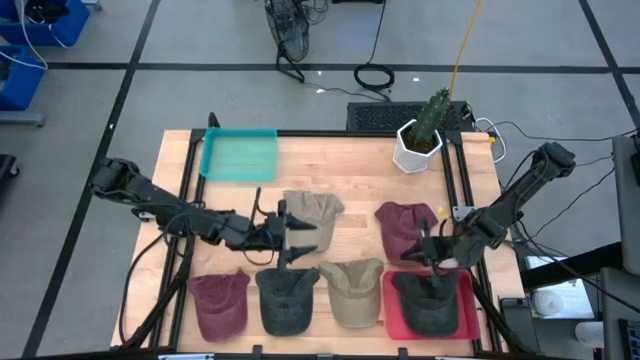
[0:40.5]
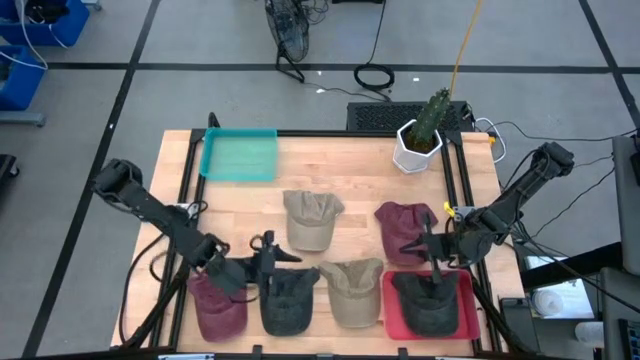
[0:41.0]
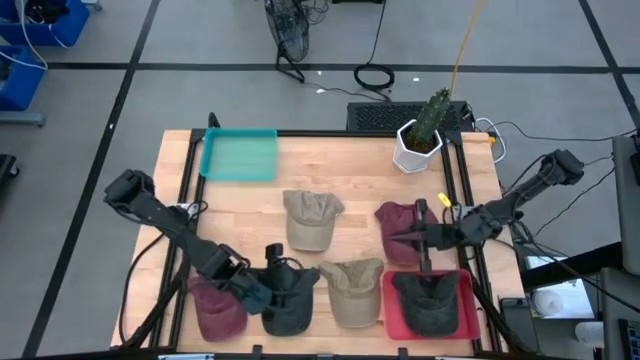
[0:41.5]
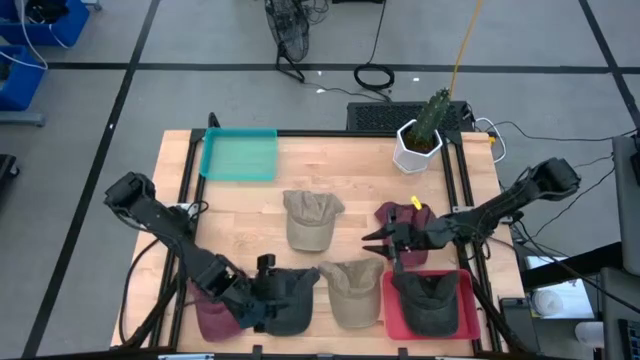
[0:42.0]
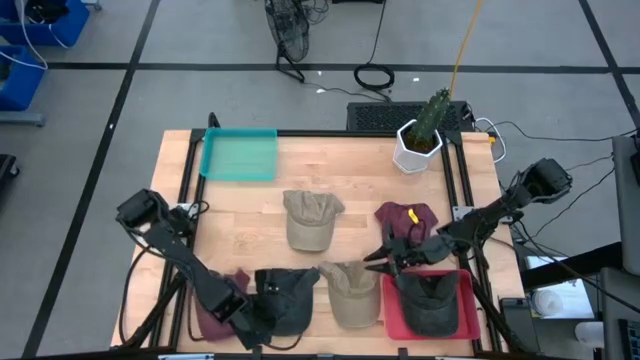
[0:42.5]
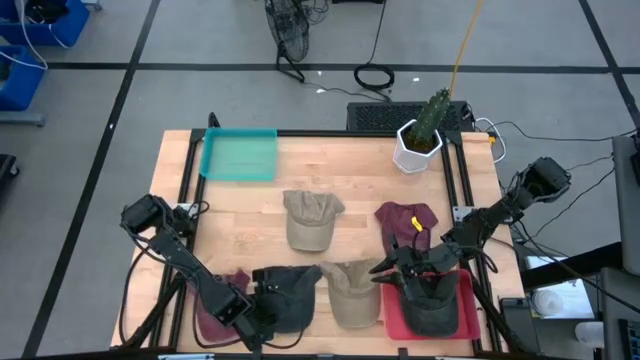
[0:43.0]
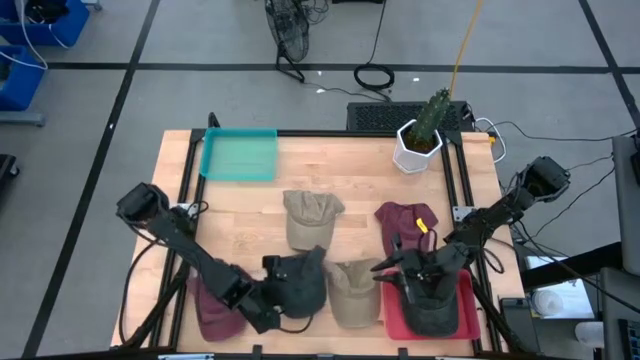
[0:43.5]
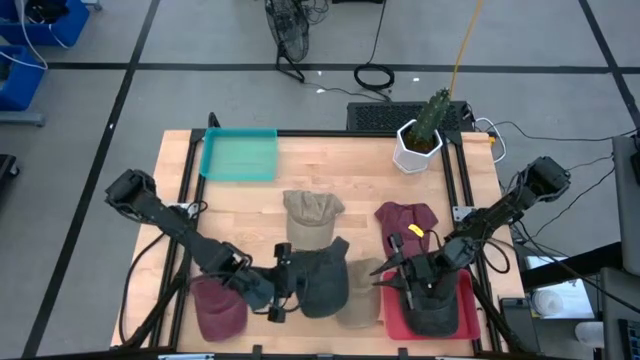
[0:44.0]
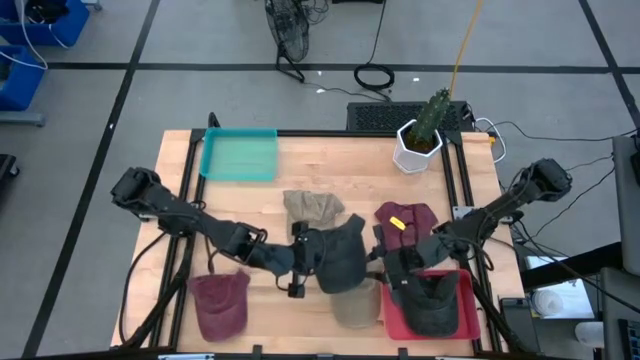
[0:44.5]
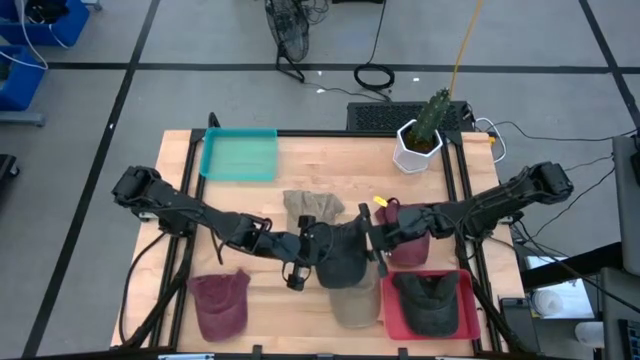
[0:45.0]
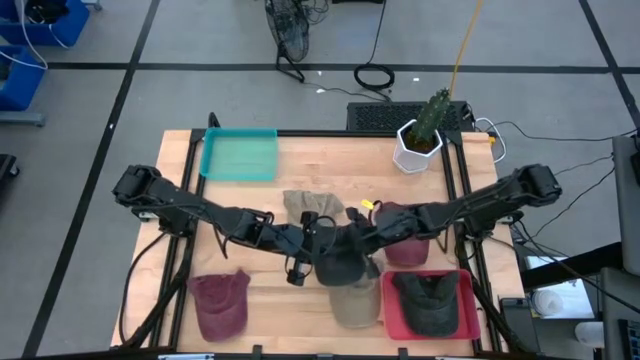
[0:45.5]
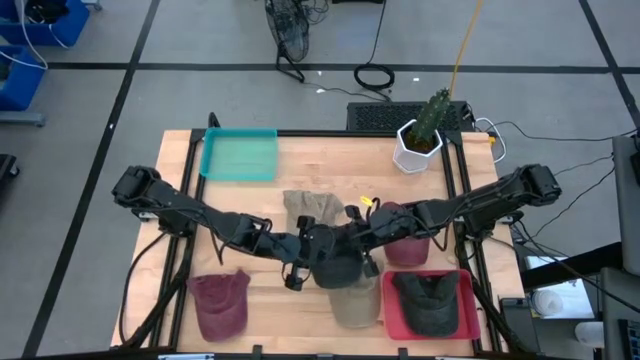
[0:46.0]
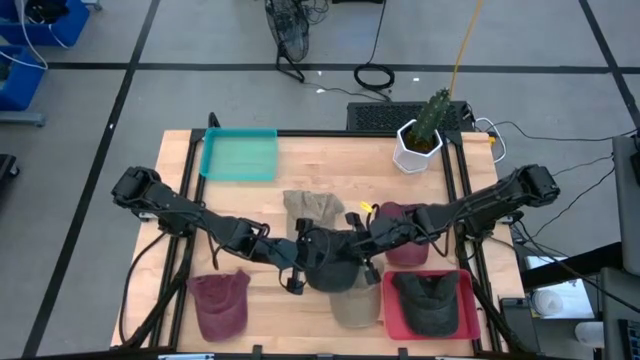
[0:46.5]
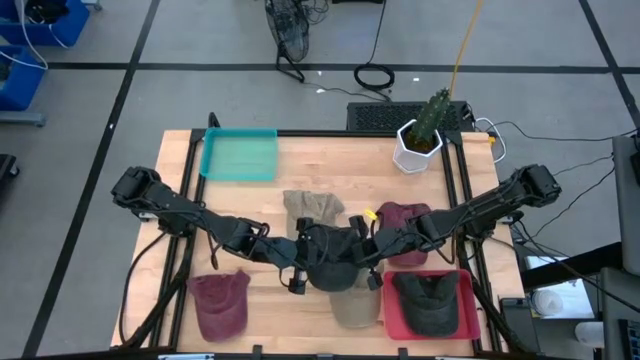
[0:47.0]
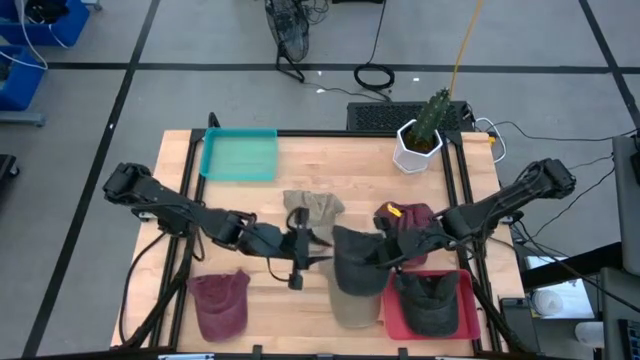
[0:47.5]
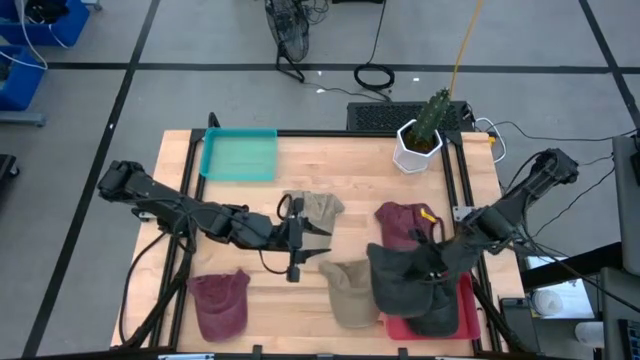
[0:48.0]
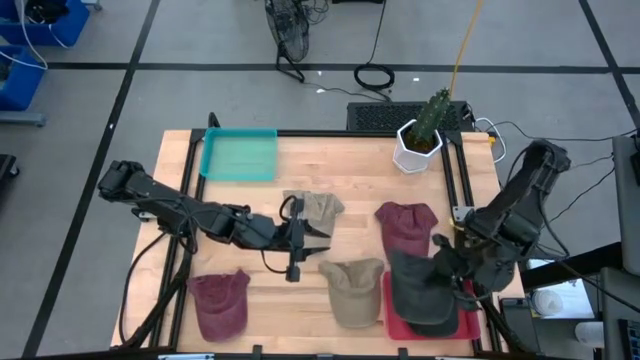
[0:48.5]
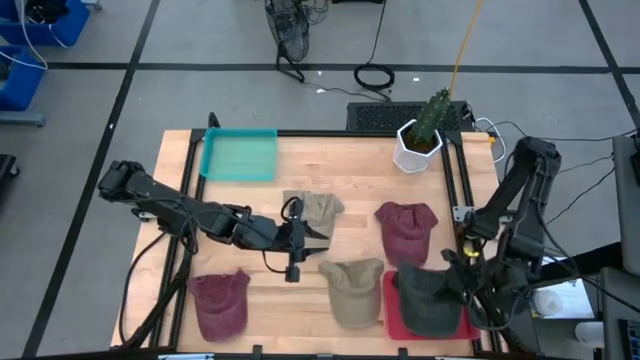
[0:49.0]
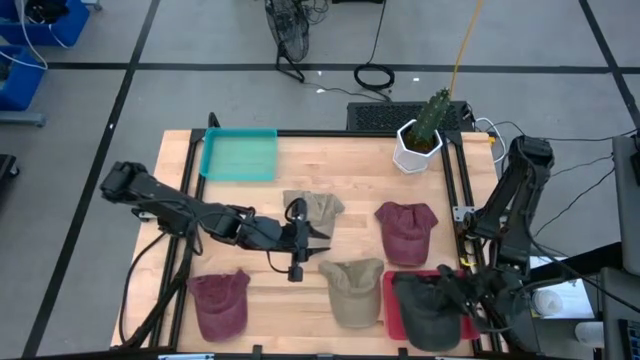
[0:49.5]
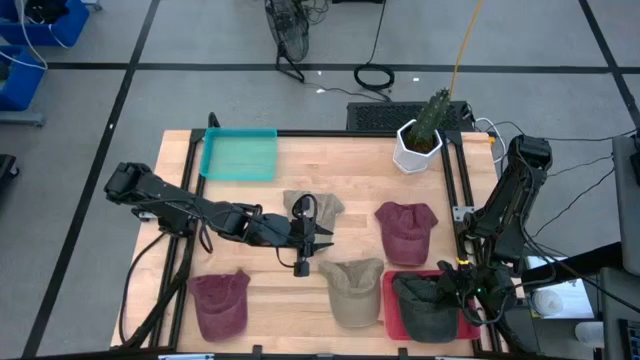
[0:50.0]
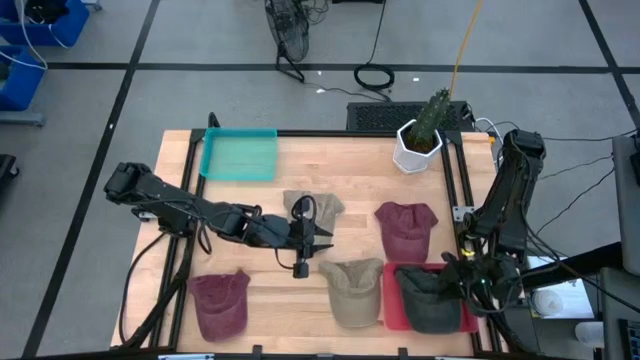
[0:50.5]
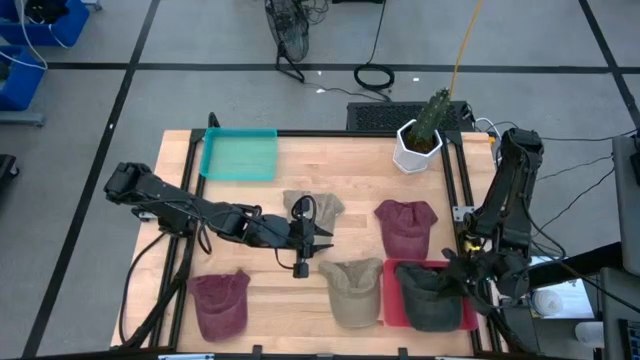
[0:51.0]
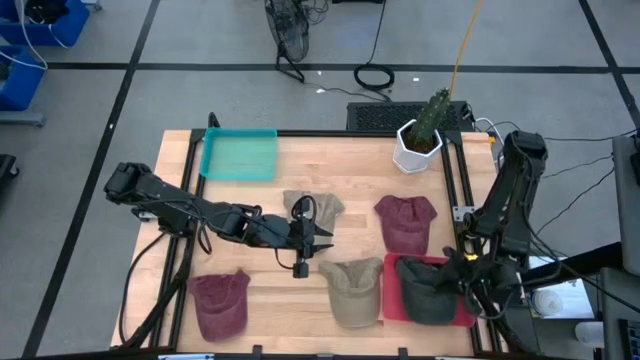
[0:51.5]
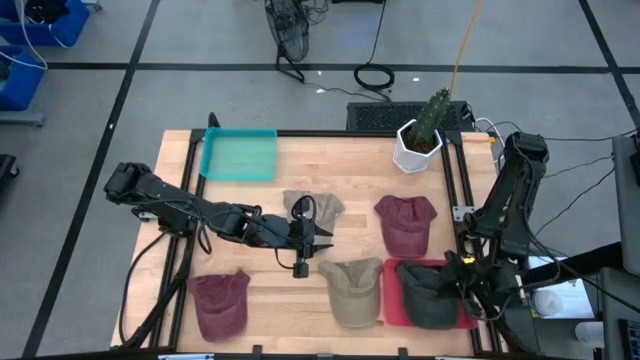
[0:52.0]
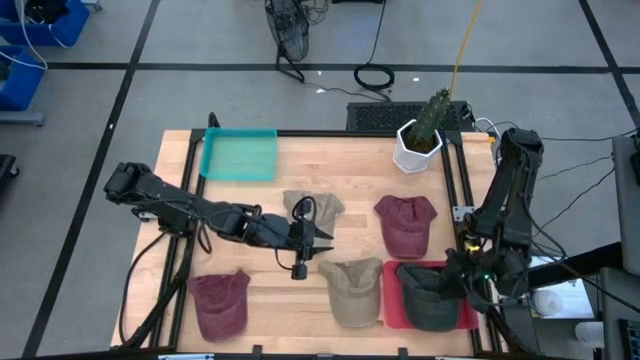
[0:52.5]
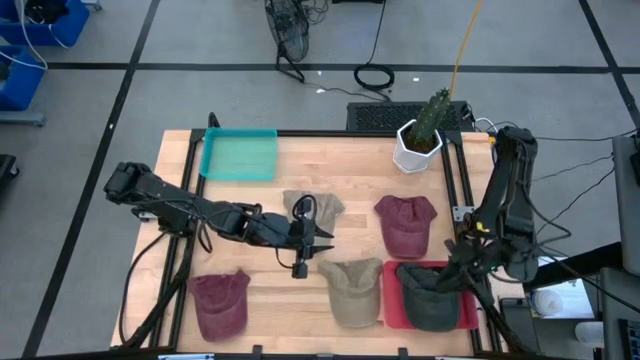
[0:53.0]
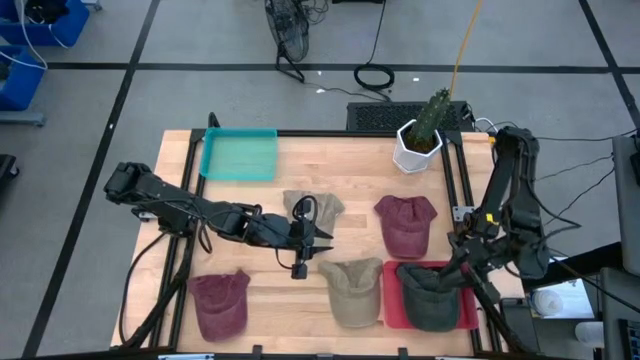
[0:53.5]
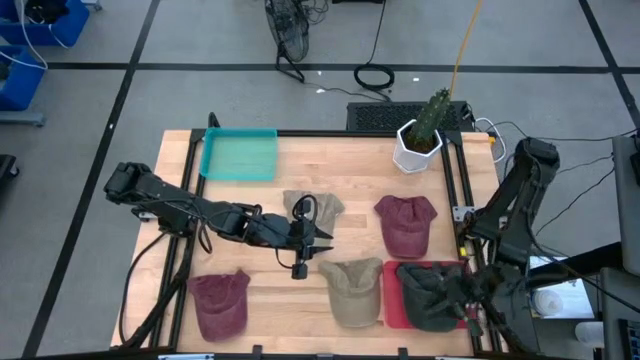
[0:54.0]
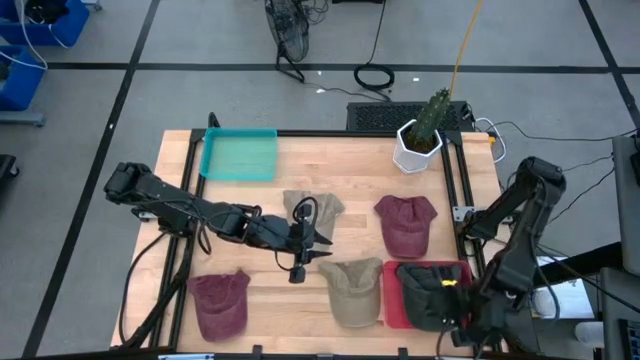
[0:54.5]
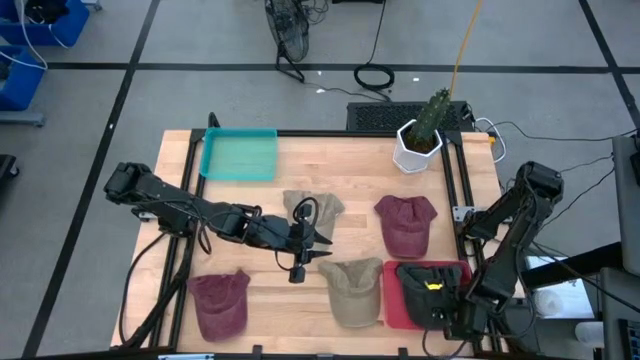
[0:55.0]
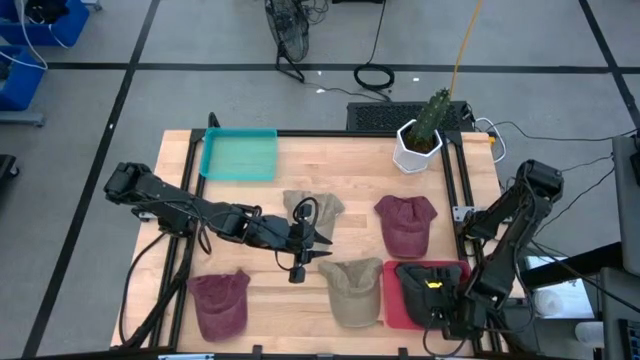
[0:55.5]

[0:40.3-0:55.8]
Task: Pick & Place hat
Put the black cap into the red bin

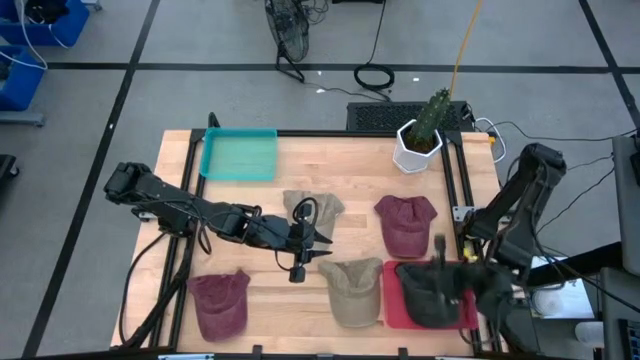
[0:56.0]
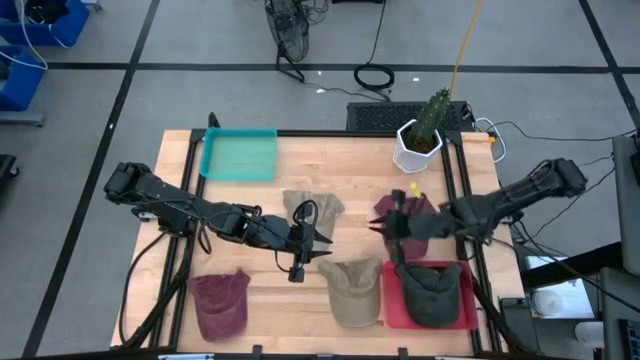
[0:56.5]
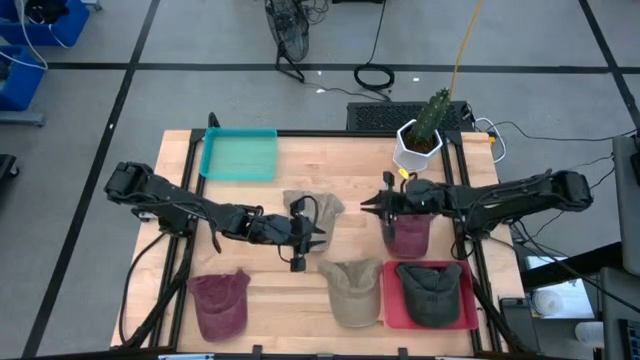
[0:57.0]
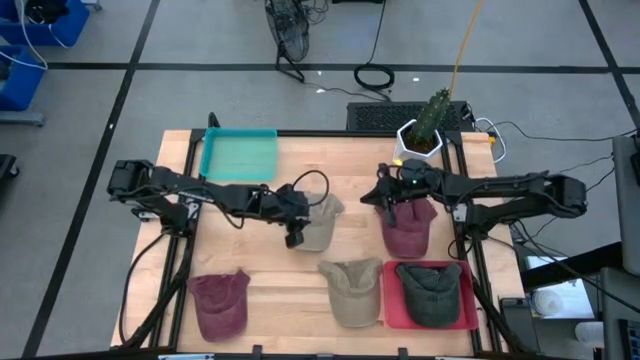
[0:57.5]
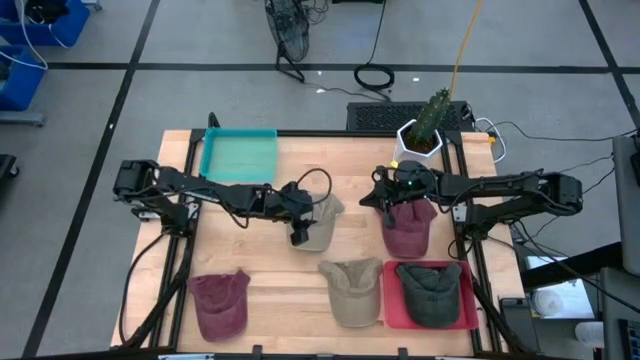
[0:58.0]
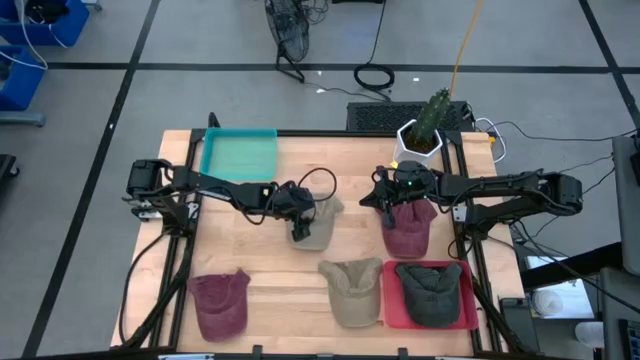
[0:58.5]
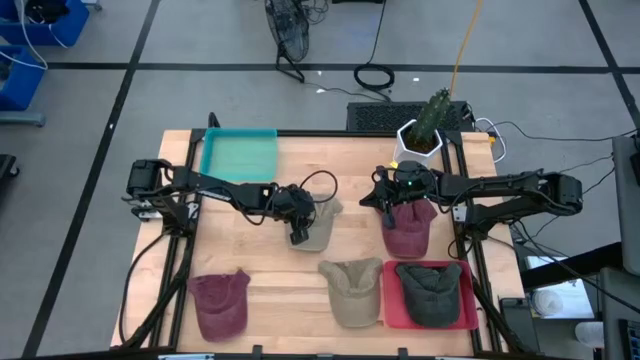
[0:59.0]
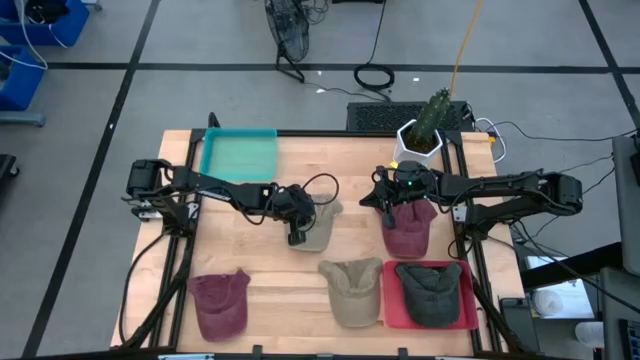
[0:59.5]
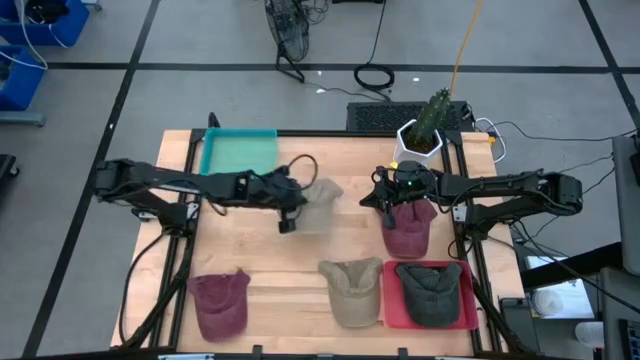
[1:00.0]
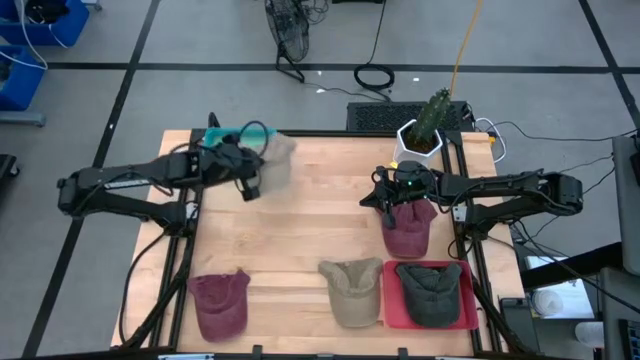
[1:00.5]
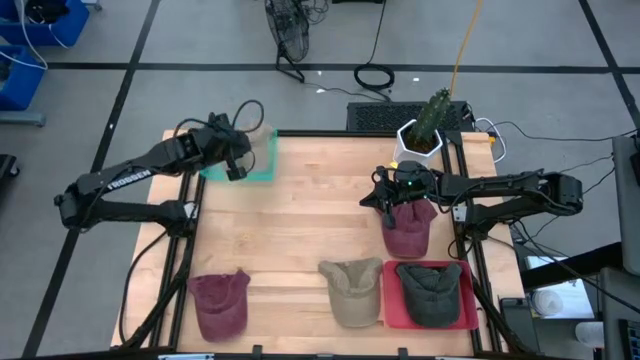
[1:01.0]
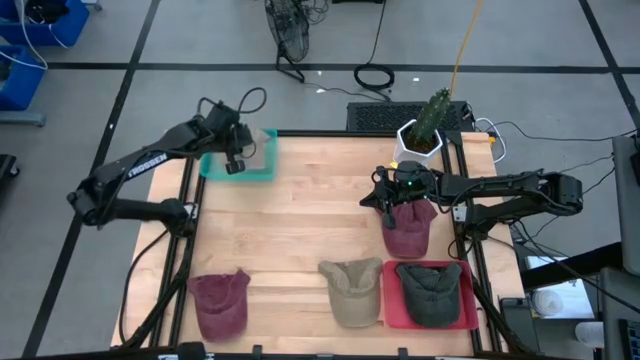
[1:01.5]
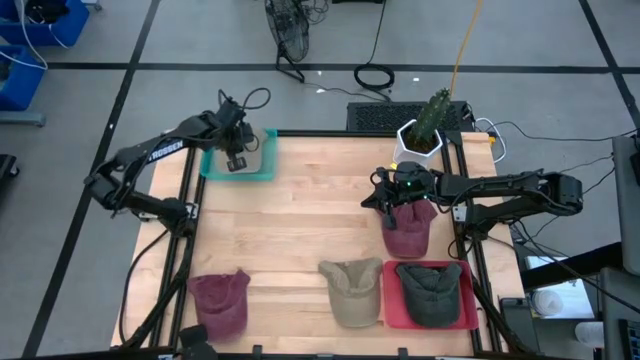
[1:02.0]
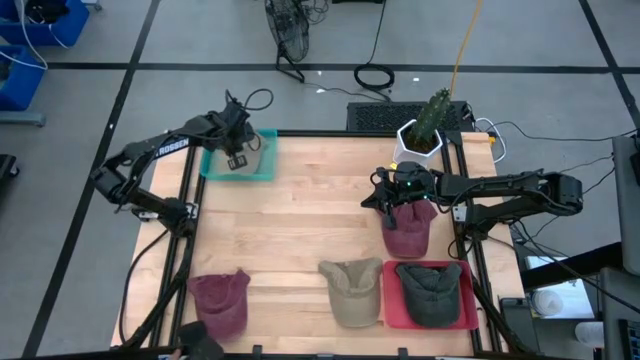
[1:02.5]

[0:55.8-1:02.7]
Put the top brown cap into the green bin
